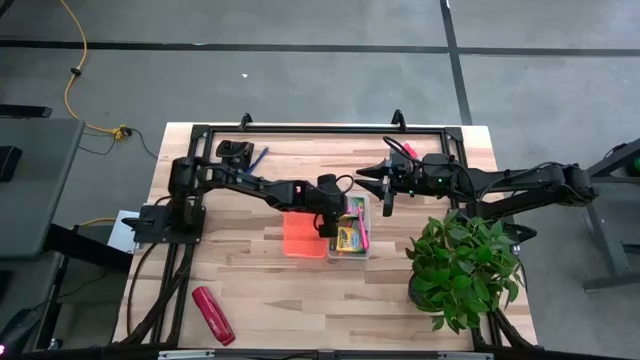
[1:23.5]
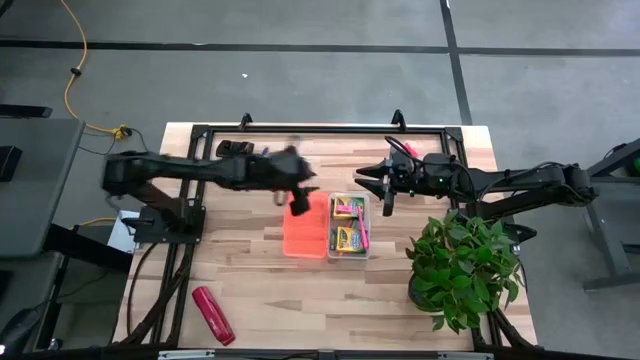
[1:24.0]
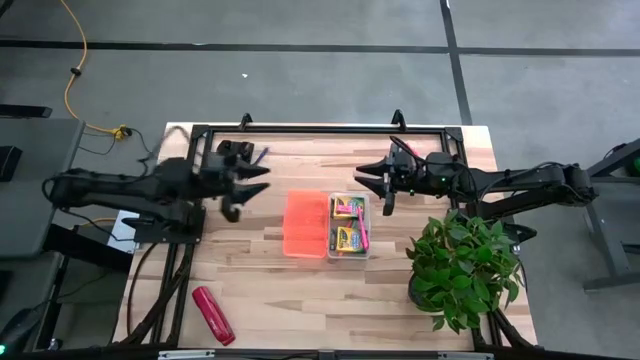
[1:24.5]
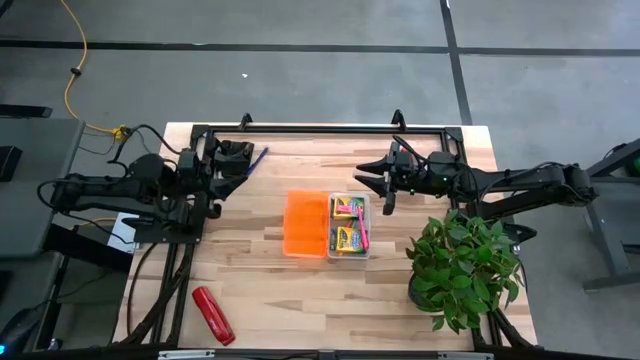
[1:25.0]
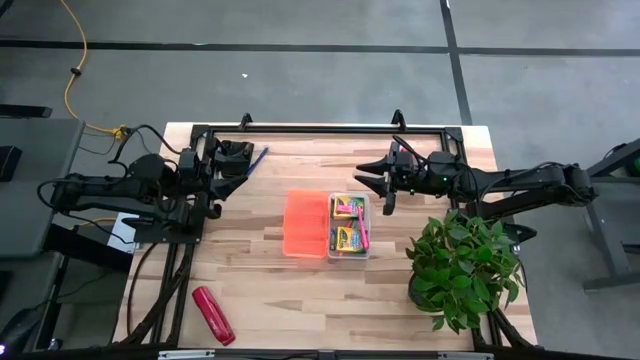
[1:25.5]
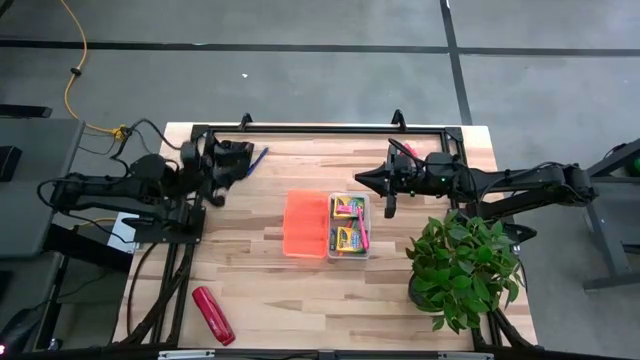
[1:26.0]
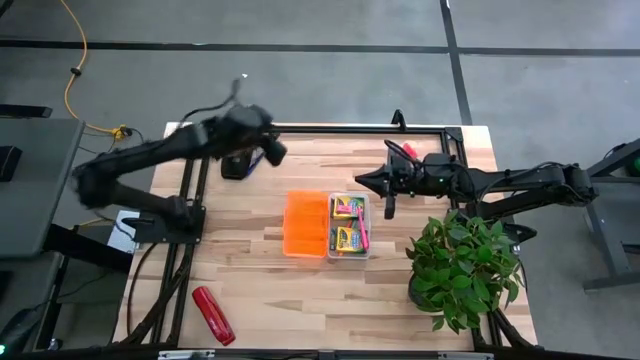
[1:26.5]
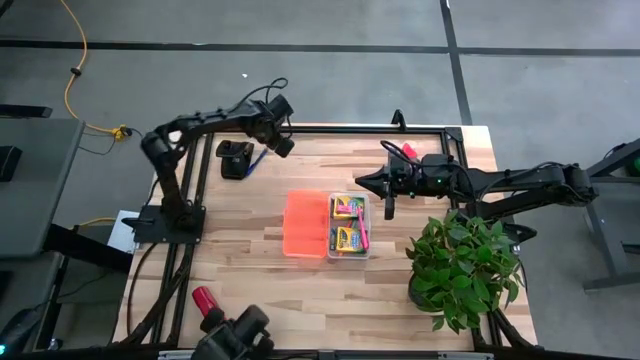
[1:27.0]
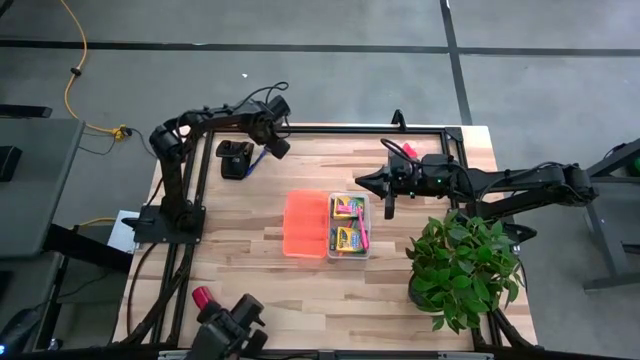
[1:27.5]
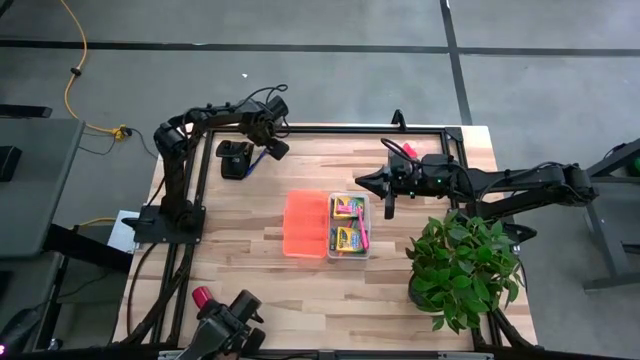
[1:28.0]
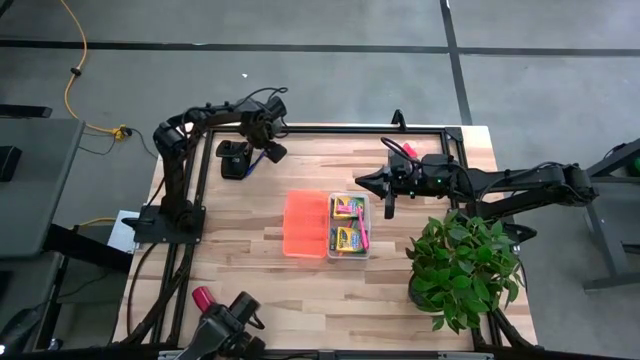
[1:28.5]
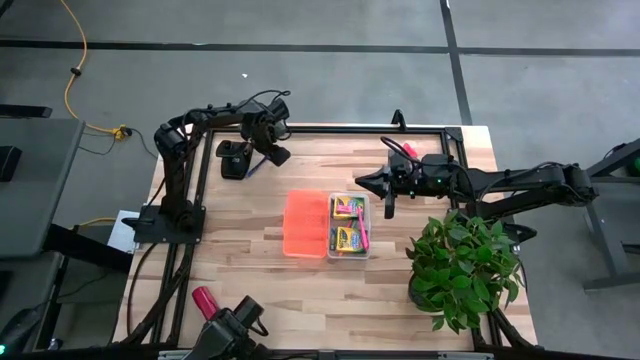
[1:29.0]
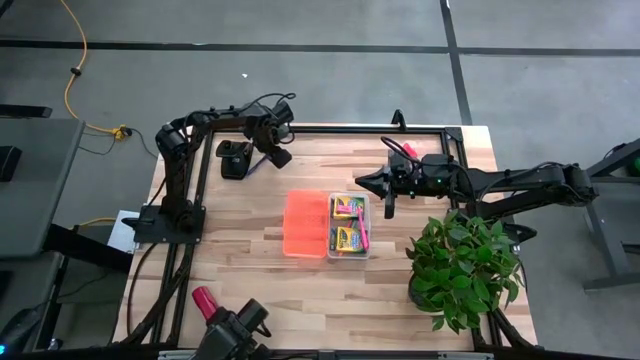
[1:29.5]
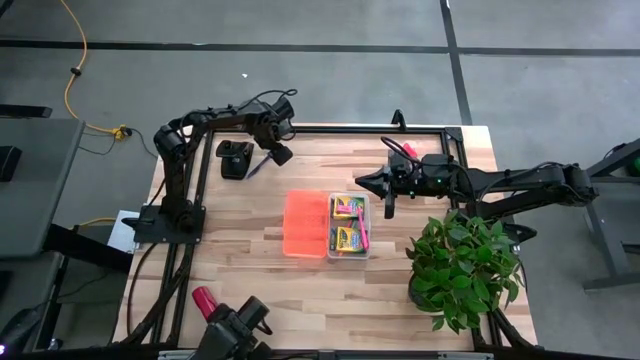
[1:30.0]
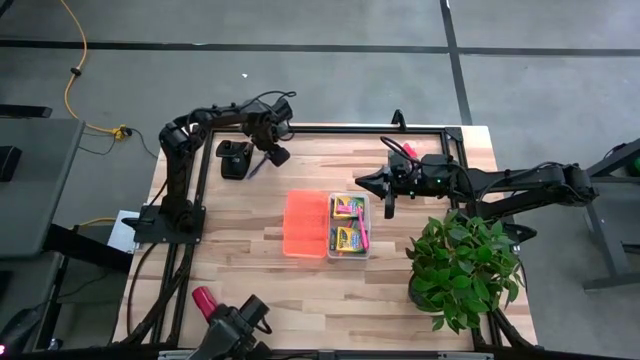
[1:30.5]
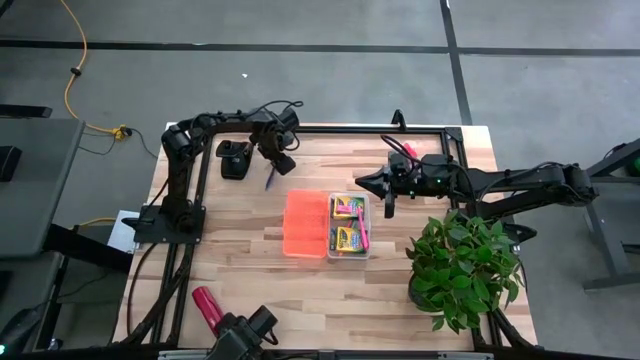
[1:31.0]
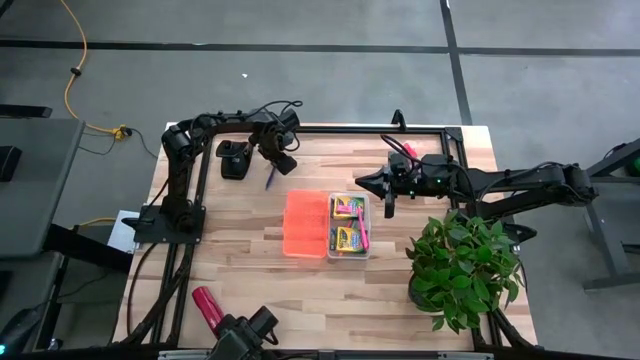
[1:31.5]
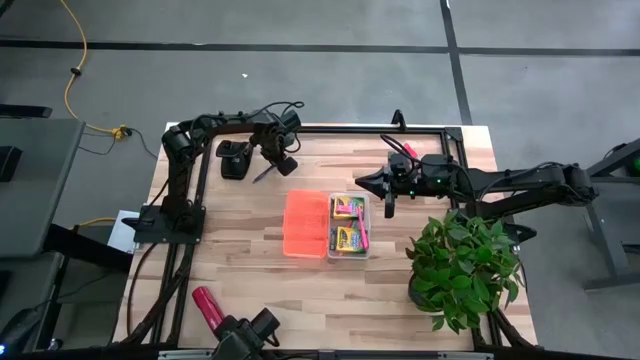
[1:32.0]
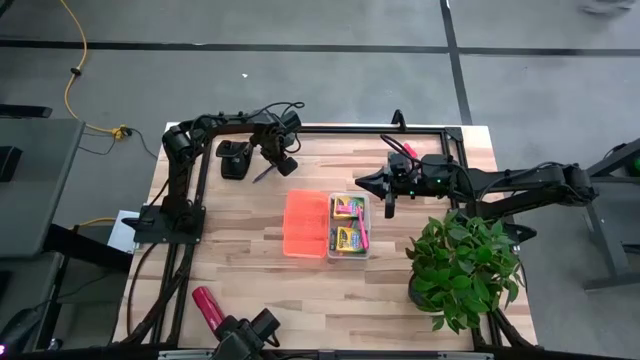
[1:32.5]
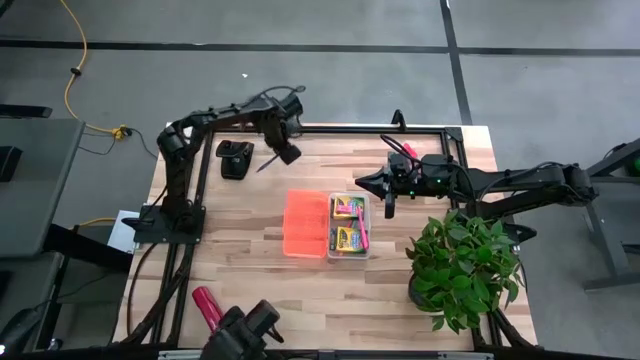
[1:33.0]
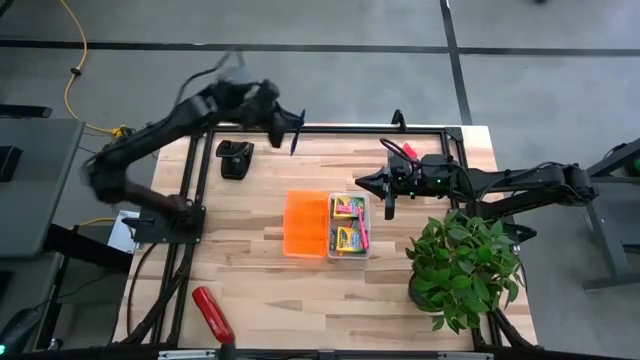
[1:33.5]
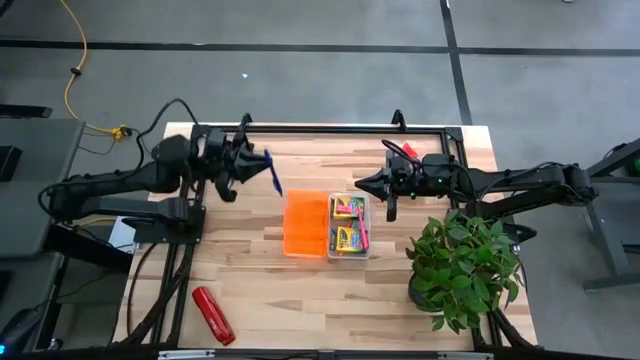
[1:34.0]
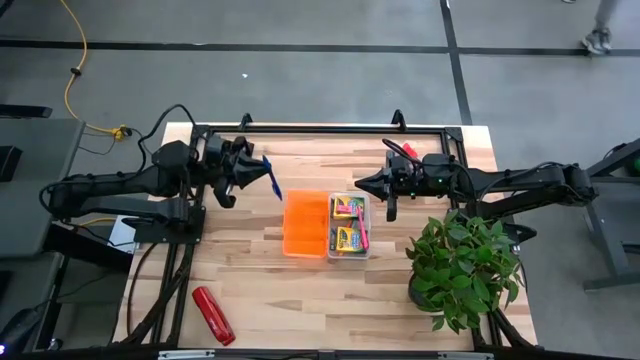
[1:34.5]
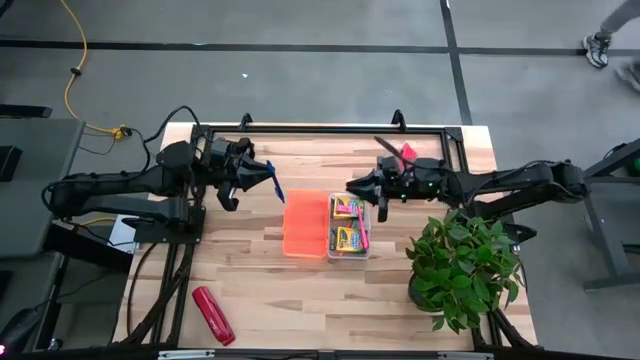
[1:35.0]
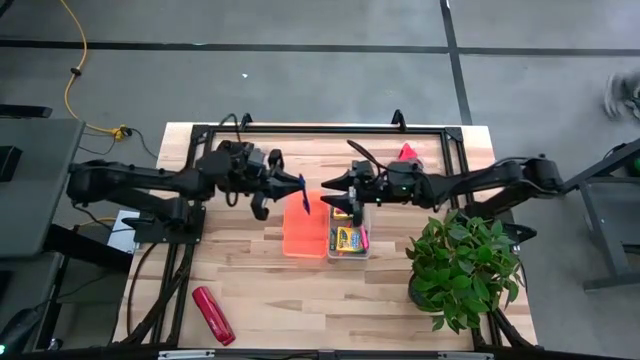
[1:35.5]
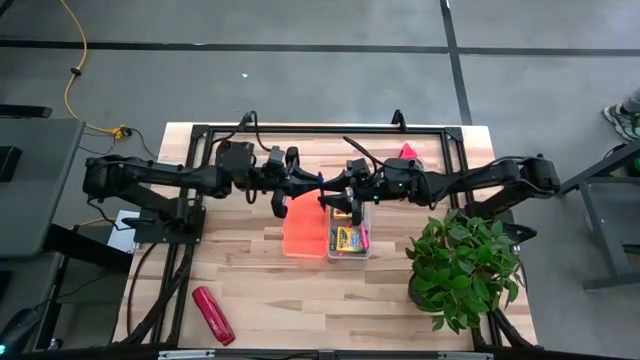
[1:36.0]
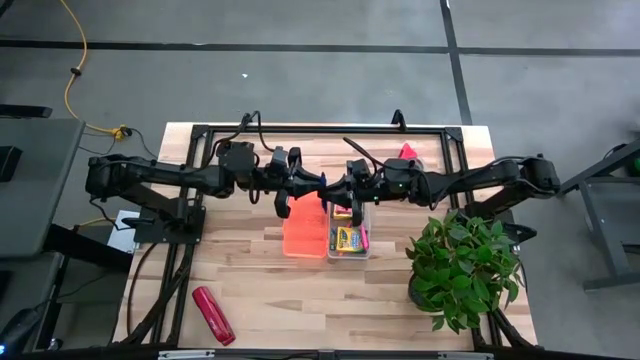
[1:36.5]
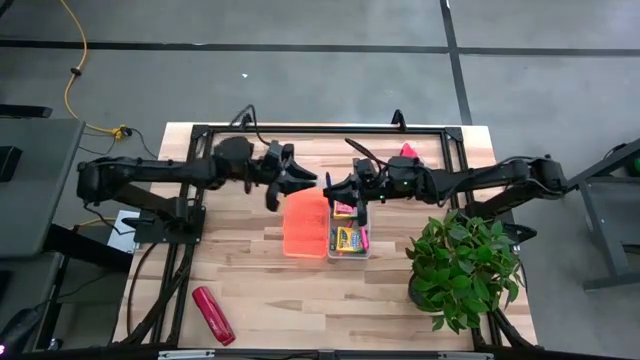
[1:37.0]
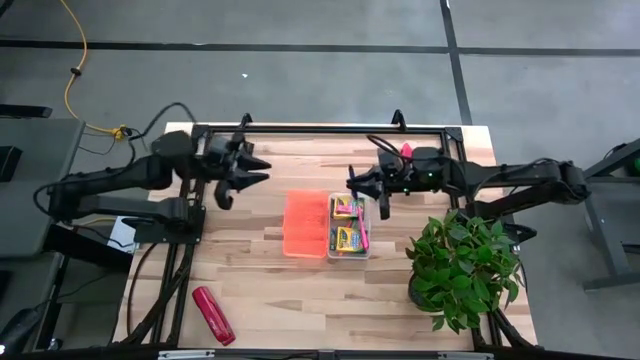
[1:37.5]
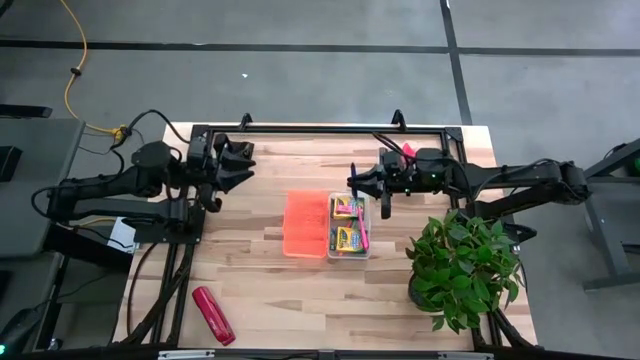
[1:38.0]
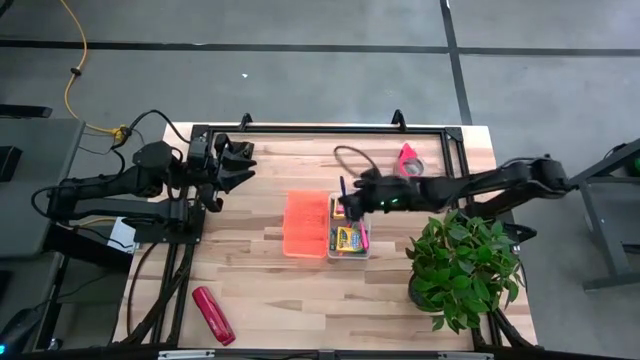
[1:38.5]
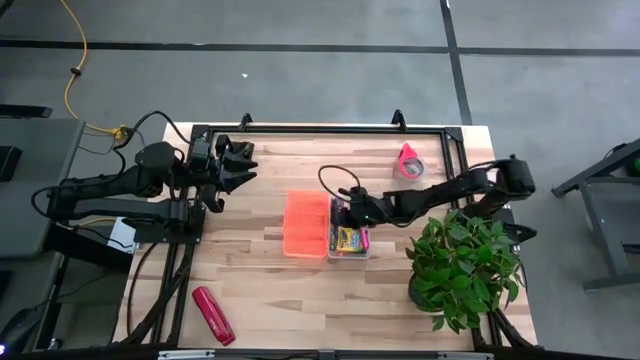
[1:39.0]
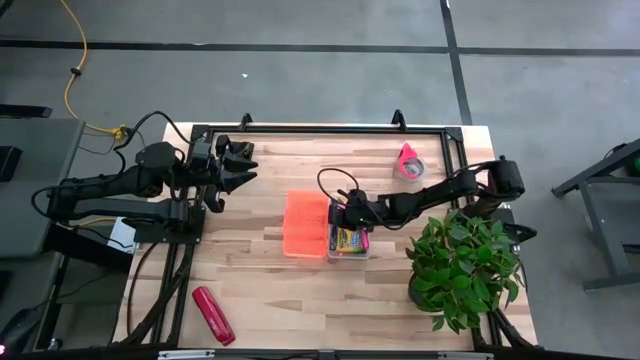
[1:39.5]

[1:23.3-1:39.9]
Task: Pack school essentials
Put the blue pen in the supply box

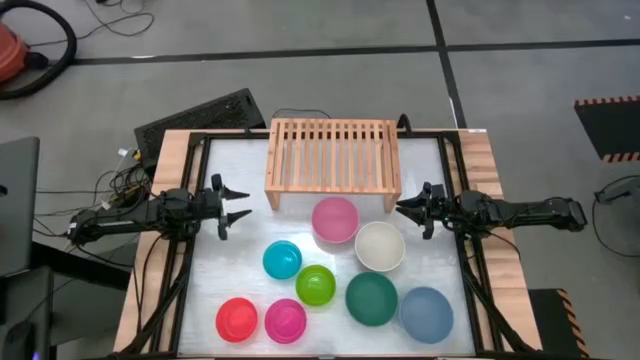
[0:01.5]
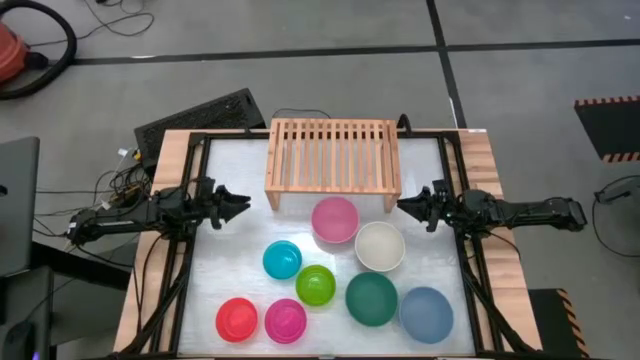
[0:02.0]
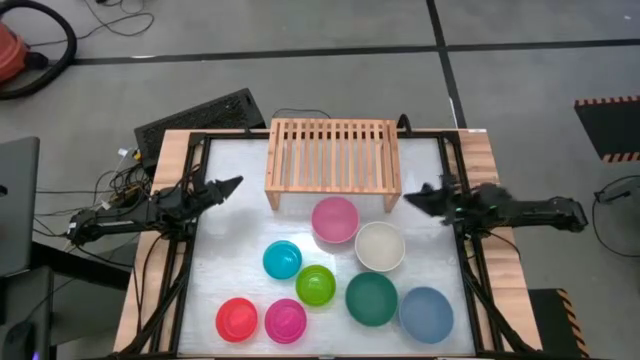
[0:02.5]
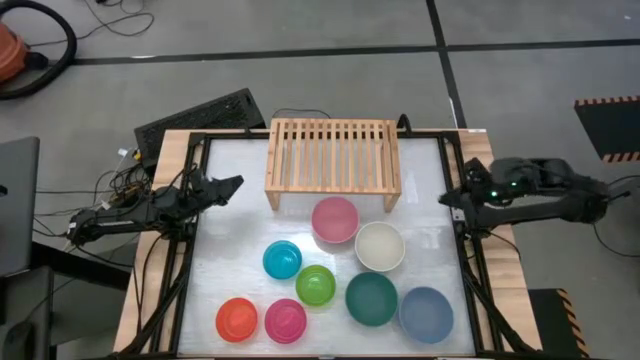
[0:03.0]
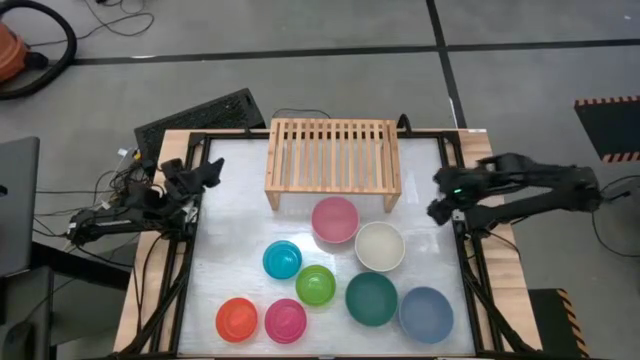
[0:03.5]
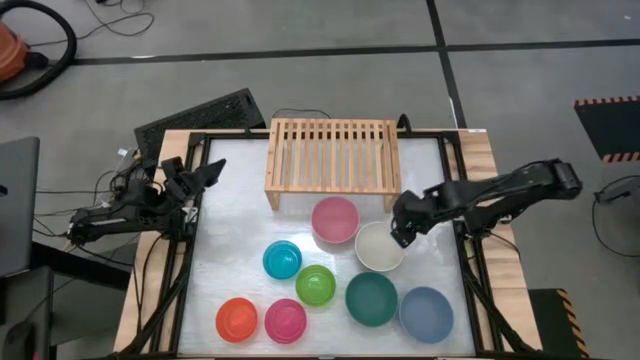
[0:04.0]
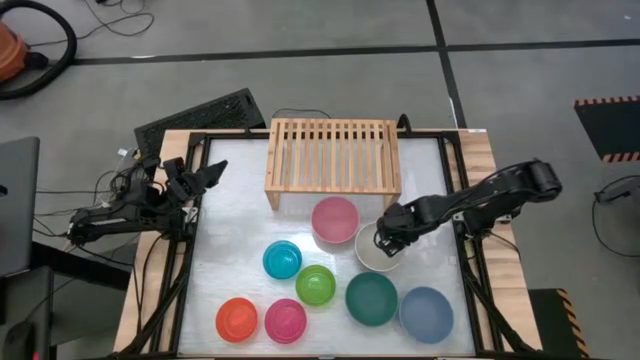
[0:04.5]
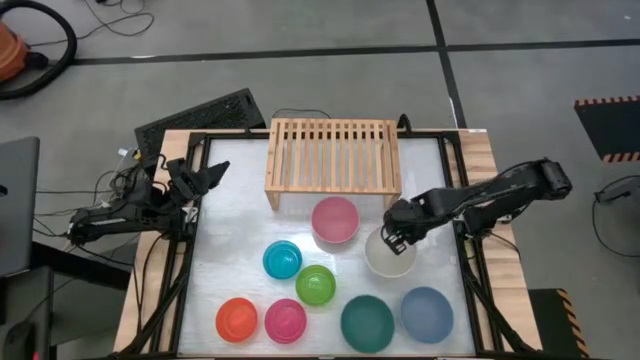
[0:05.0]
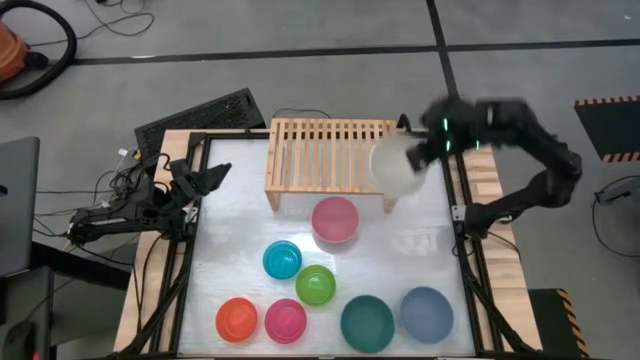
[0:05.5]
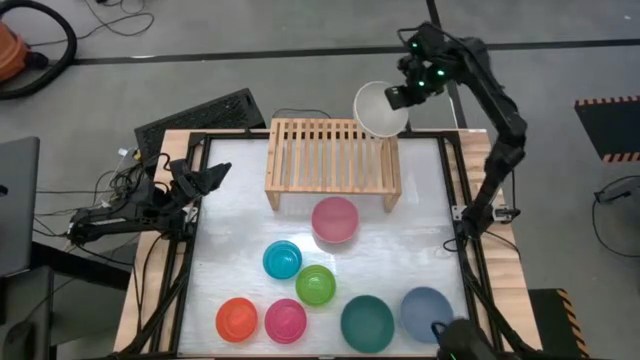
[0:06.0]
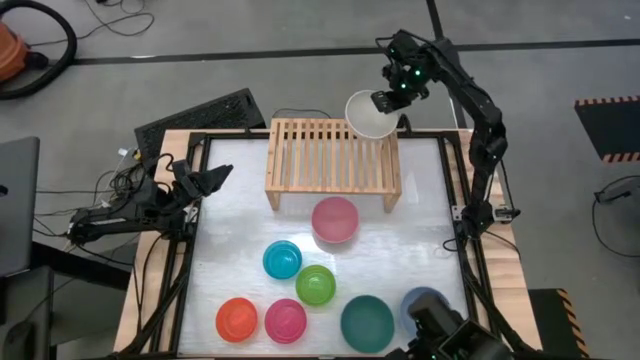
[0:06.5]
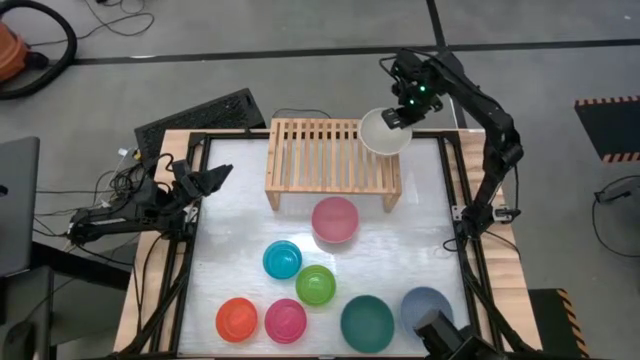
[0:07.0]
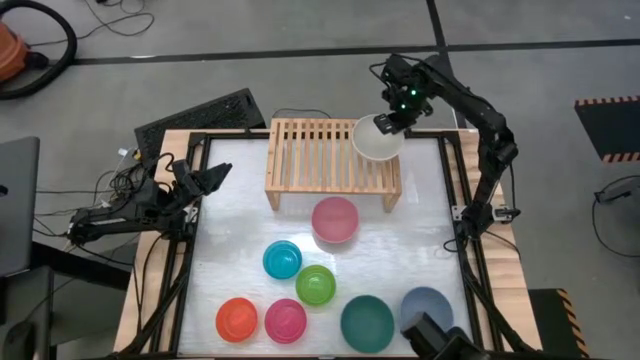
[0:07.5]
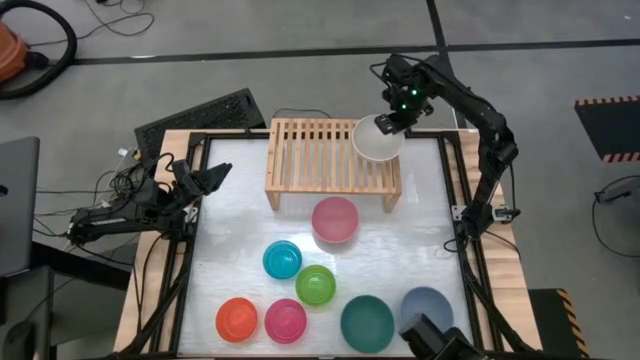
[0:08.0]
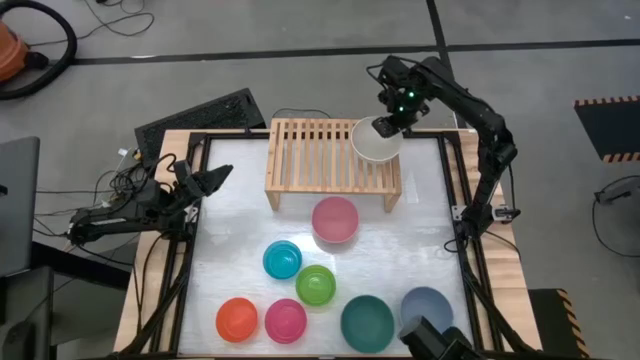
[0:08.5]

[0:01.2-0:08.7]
Task: Place and stack bowls onto a shelf
Put the white bowl on the shelf
